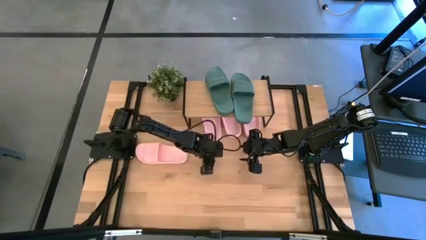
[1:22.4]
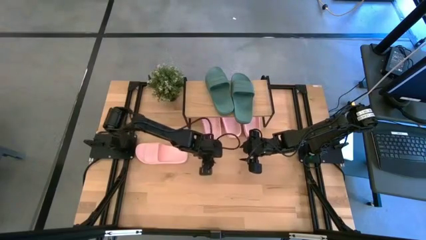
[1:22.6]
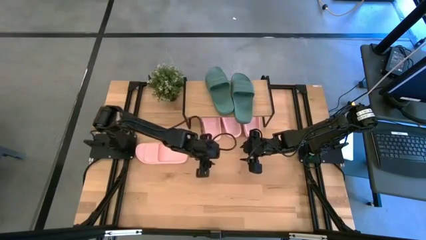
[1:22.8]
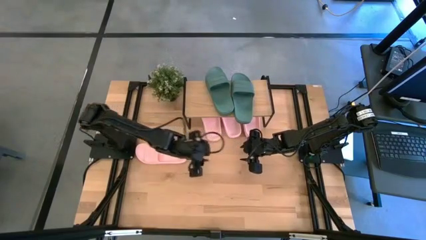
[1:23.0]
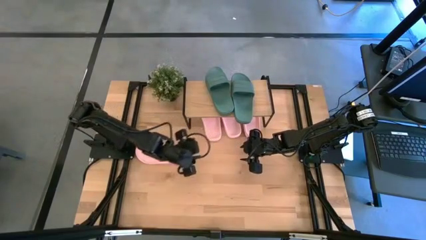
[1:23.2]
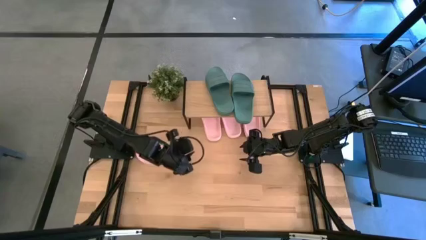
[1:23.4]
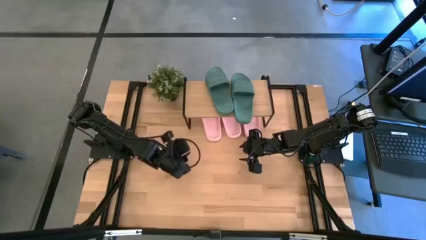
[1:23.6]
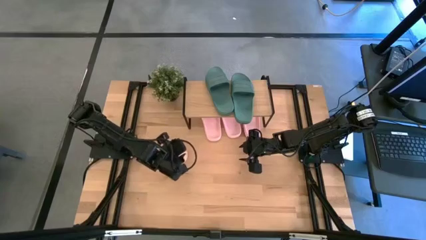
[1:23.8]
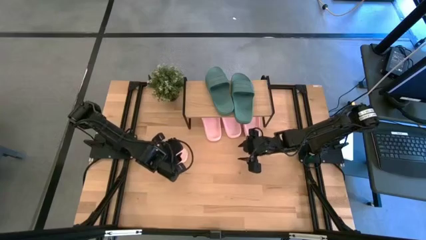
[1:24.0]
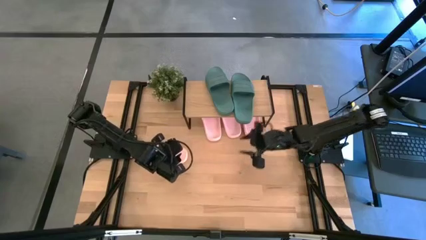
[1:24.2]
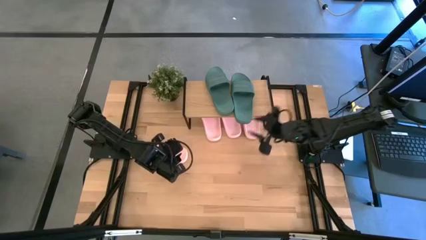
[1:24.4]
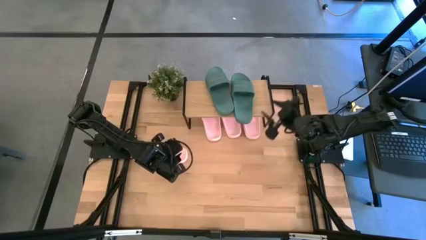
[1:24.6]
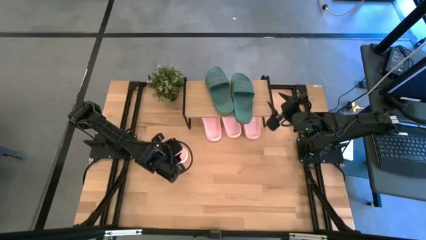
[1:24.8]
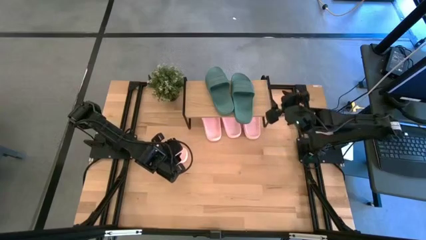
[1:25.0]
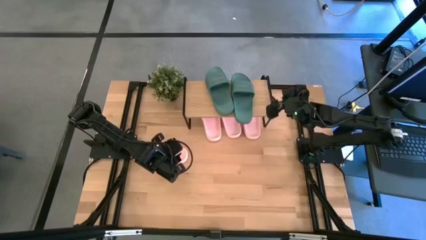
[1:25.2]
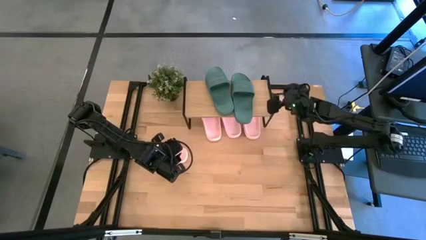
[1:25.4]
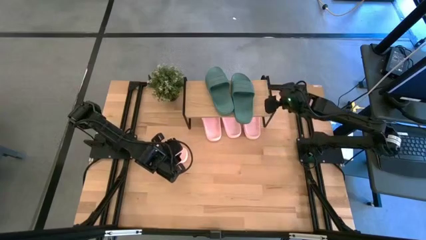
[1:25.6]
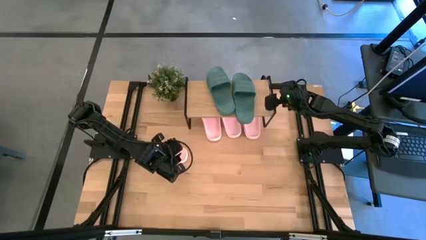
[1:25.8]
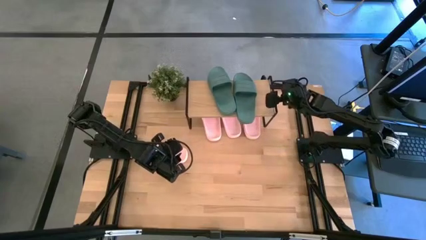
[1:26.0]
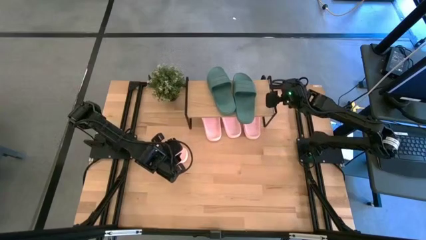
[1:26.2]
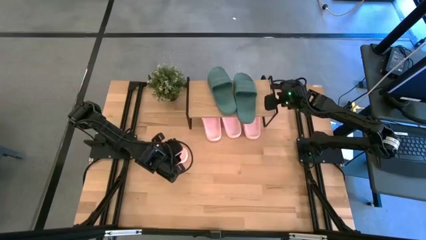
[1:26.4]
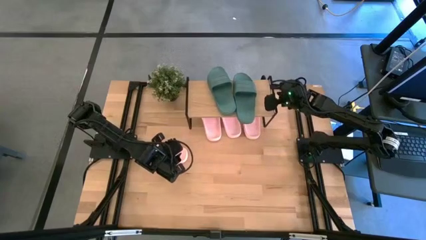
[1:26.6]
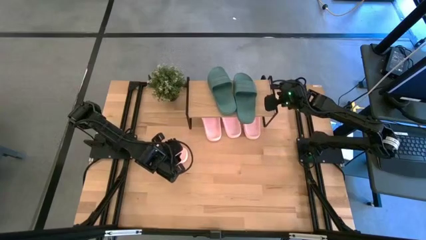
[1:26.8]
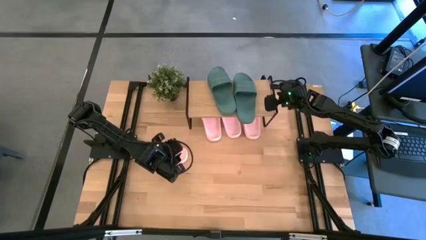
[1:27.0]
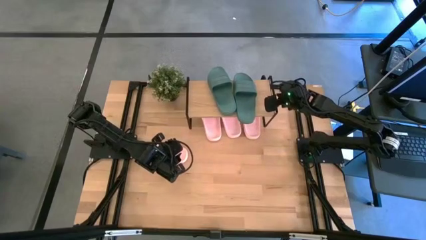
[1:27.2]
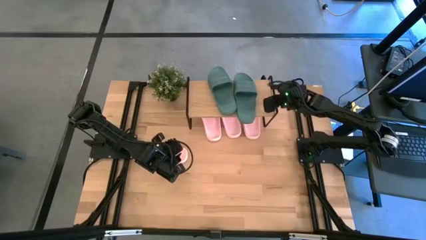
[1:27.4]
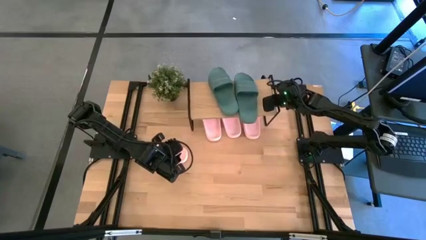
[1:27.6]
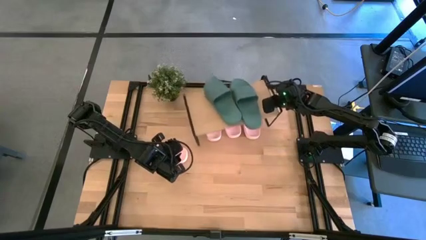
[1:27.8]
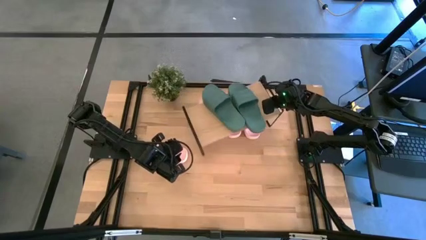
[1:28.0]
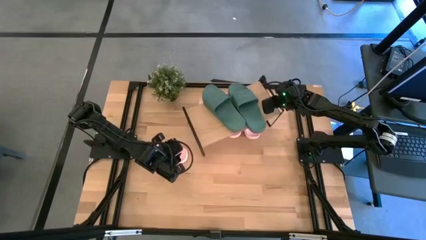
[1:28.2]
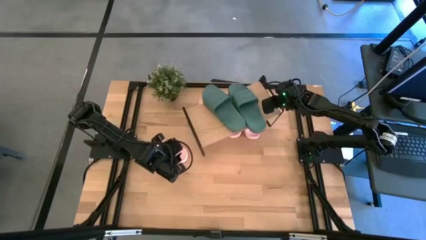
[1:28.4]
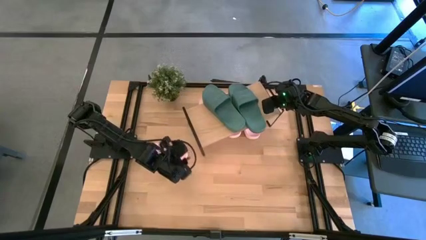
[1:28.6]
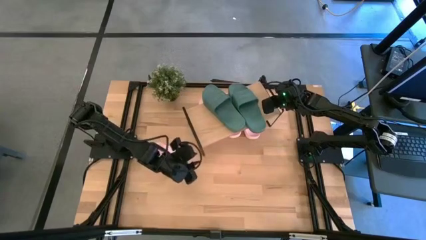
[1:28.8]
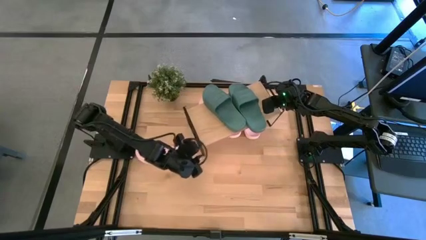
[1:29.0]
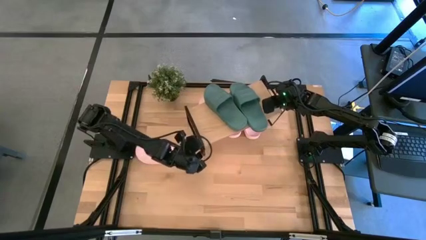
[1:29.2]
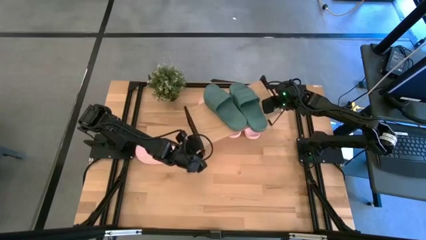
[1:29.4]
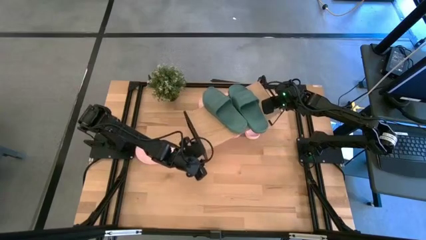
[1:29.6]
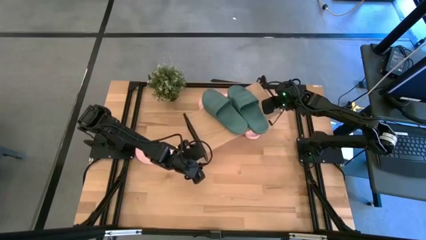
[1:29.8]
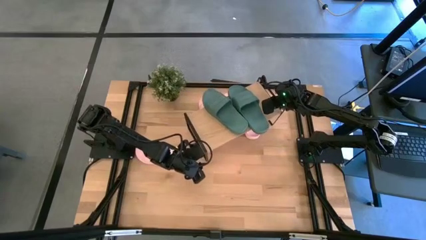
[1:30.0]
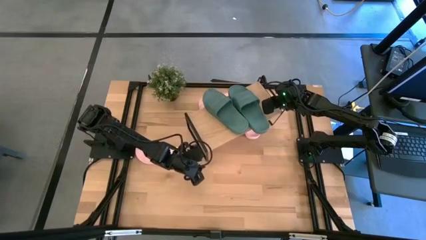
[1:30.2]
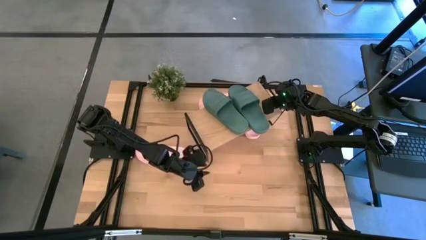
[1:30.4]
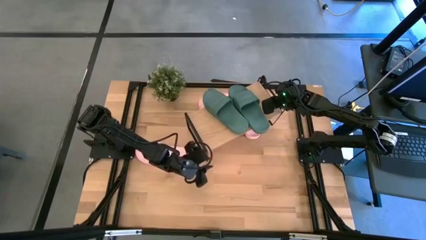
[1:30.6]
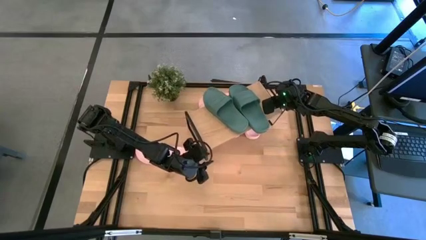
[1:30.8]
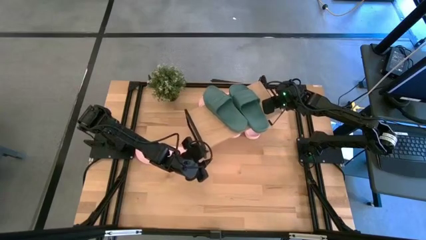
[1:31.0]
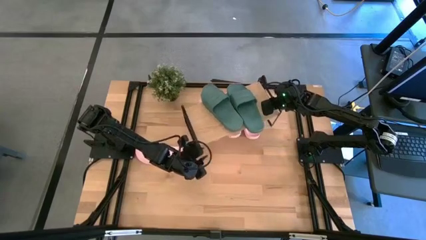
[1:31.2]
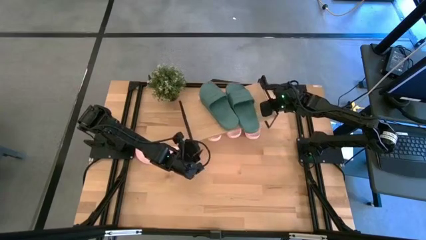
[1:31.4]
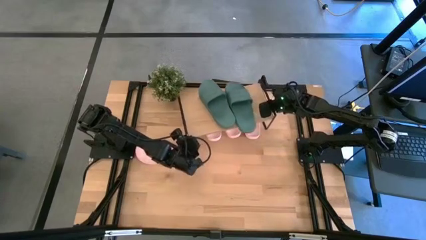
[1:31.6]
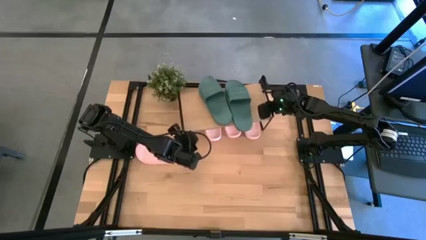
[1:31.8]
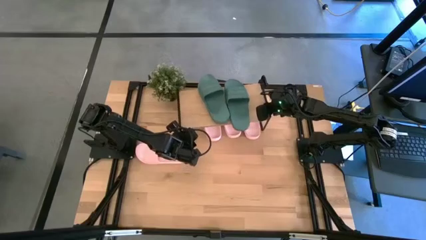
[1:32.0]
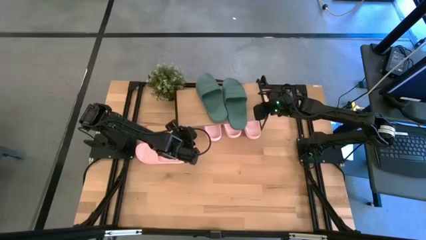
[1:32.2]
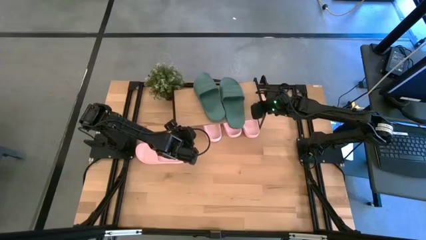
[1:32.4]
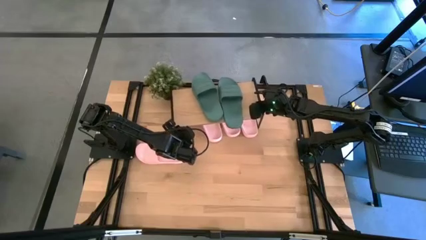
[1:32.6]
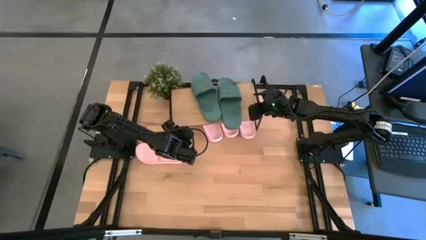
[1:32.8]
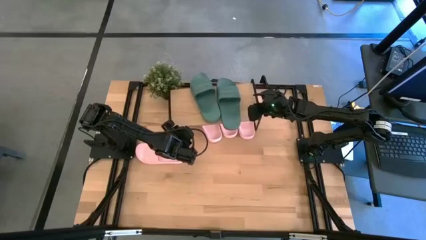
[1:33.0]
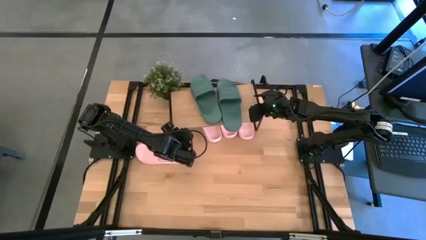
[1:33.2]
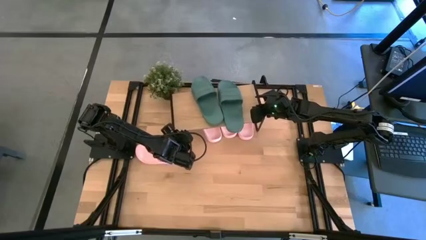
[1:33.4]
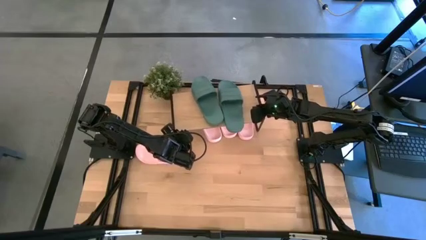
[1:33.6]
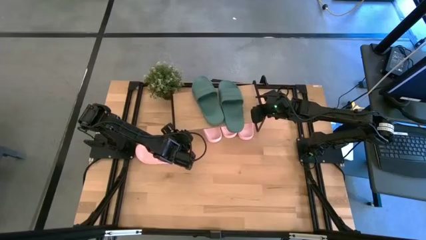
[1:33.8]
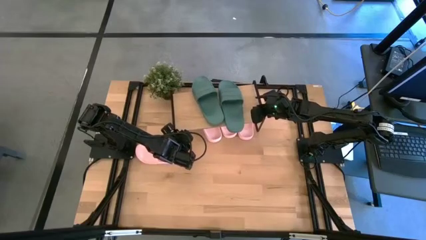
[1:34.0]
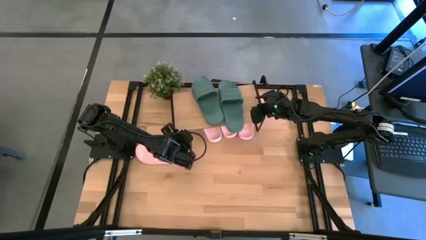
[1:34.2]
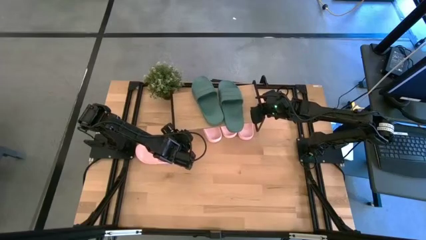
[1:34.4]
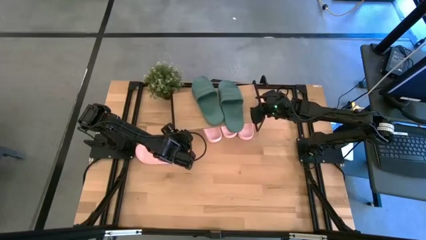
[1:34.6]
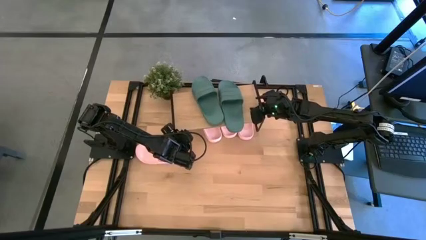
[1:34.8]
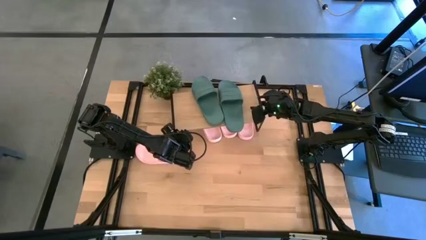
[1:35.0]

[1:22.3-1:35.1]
Task: Pick and place slides into the shelf
Adjust the shelf on the table
